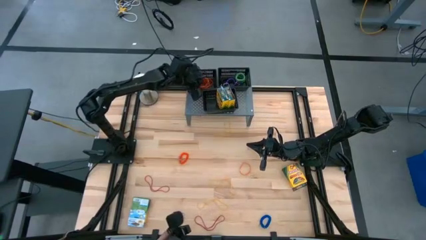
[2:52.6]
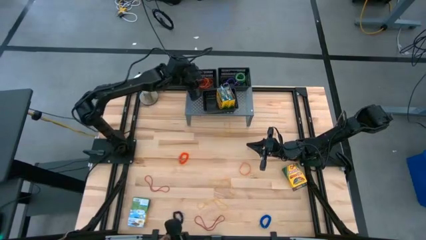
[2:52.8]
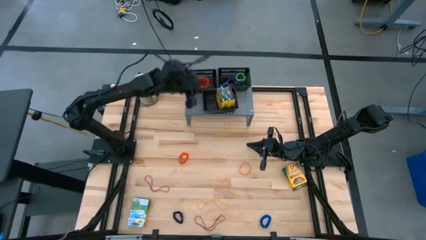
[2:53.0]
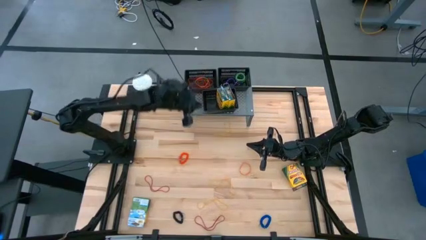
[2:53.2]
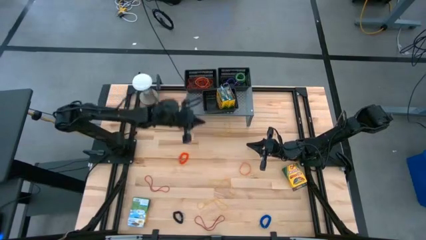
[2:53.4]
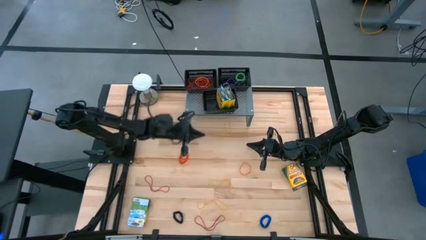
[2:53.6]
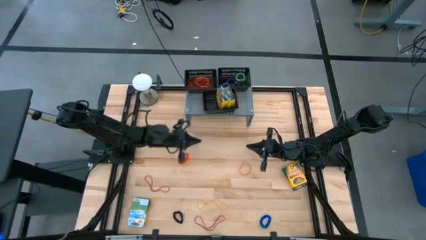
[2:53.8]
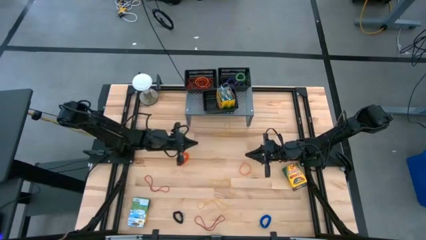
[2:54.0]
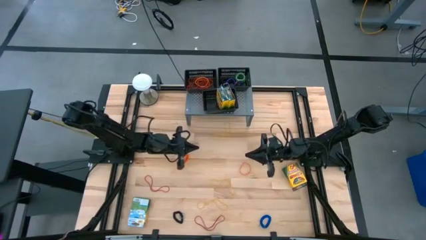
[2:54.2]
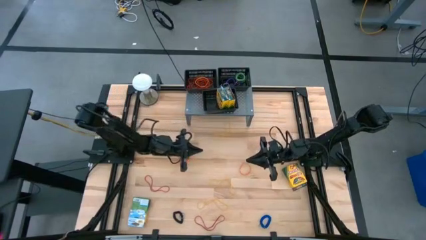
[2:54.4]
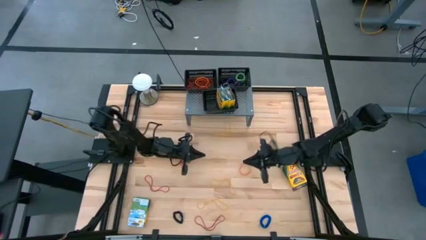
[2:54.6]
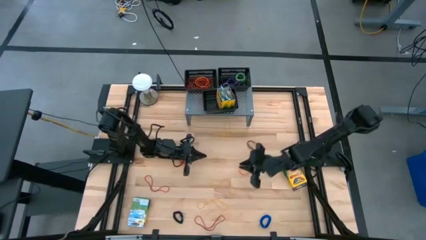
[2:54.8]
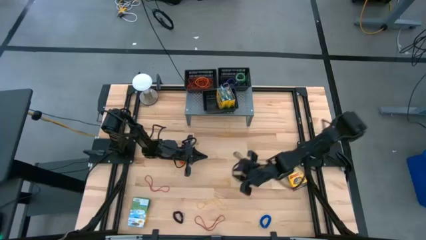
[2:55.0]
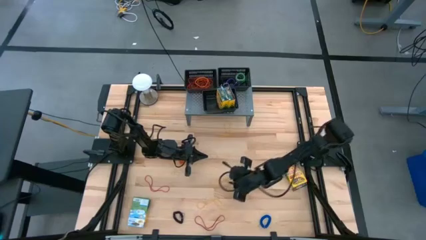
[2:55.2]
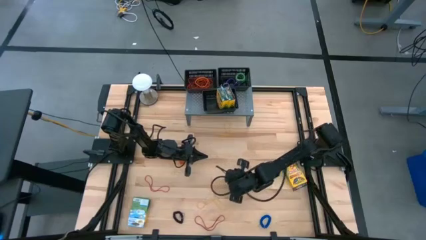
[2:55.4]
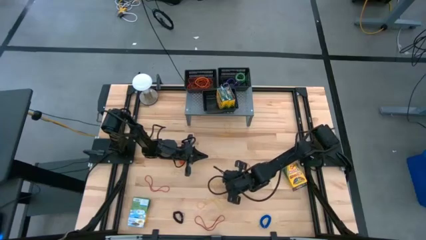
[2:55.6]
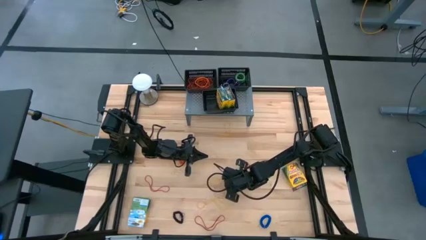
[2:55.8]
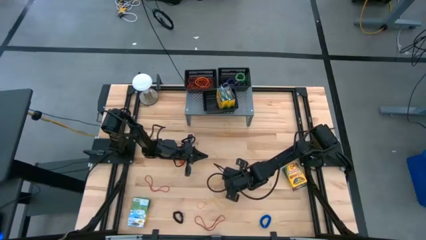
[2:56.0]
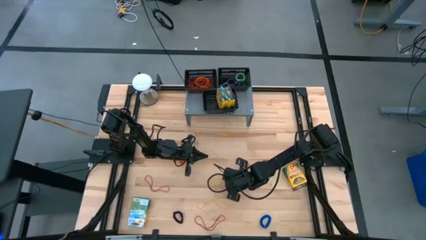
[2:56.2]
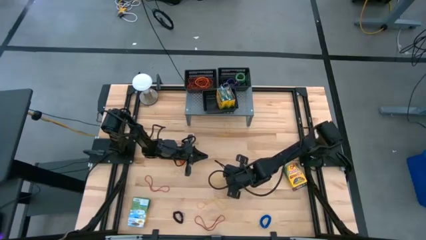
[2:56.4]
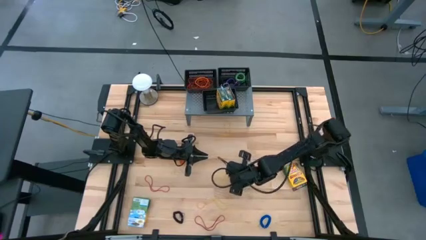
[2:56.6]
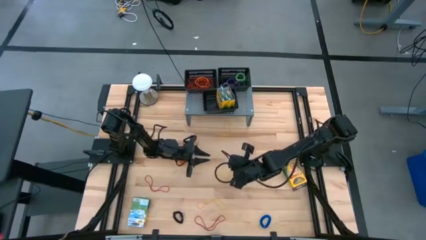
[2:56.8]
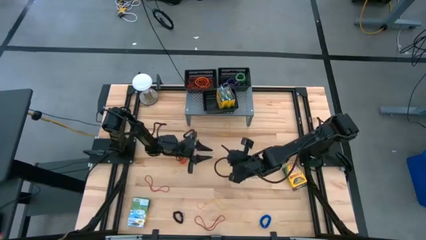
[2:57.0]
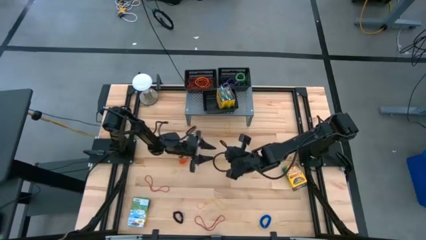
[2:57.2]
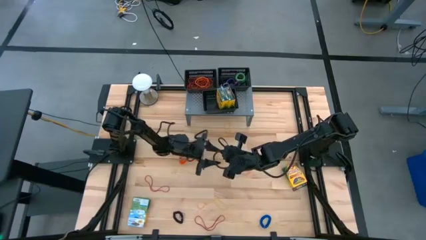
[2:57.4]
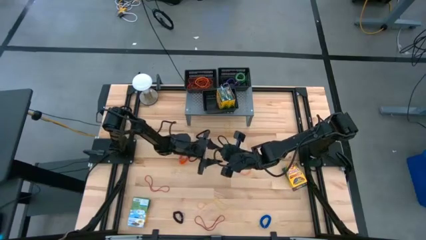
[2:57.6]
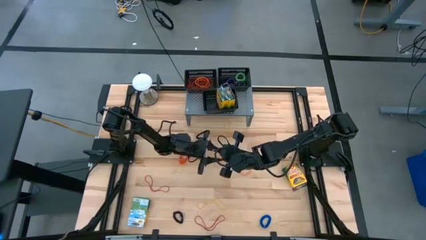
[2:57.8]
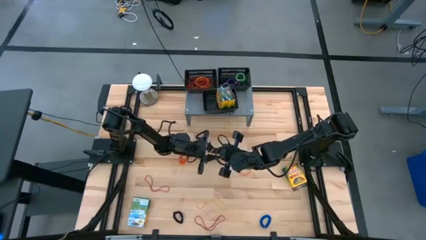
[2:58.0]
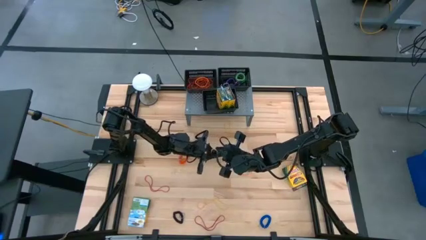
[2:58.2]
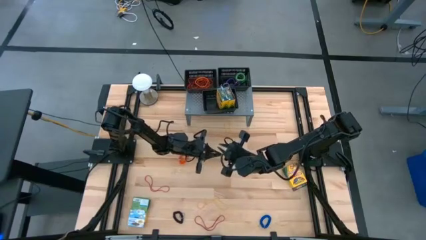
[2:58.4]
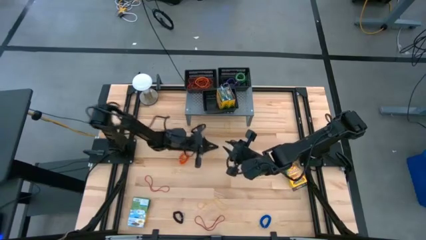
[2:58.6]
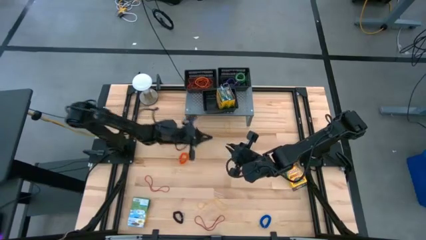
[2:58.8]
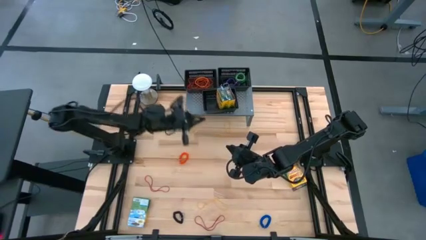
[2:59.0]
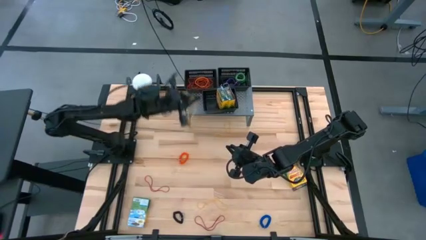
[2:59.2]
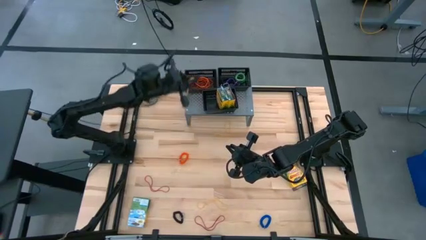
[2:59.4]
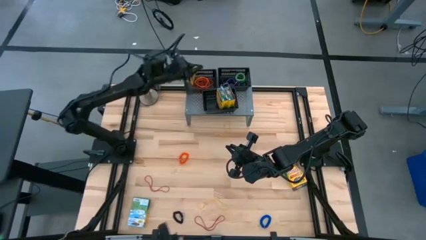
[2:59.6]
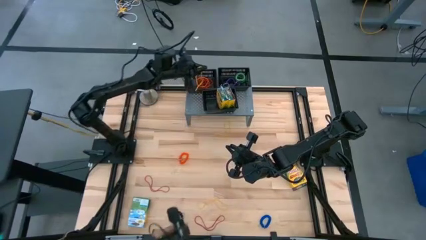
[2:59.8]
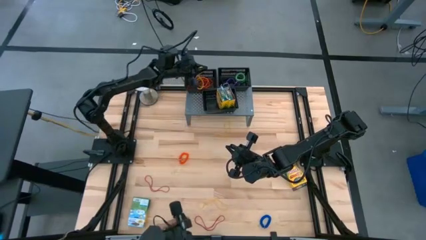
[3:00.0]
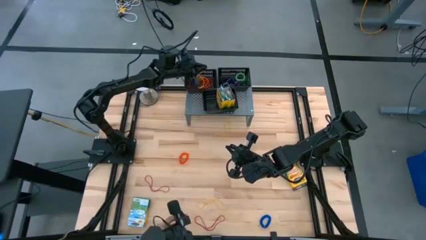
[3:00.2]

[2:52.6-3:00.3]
Task: Pick & Place Office Desk Supplies
Put the yellow rubber band into the top left black basket on the shelf

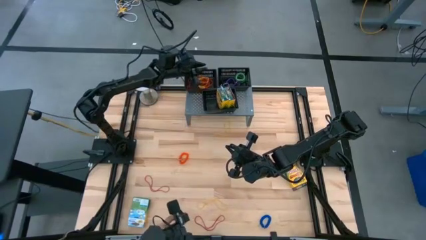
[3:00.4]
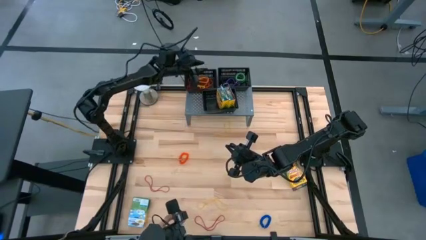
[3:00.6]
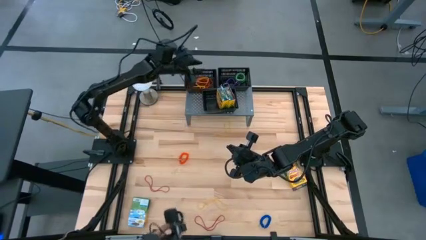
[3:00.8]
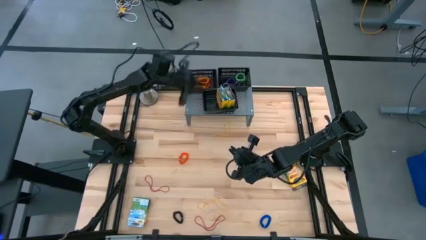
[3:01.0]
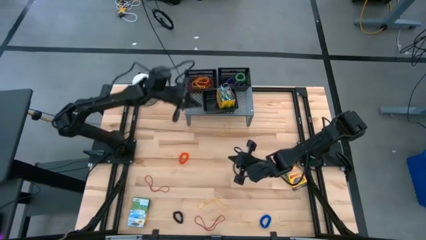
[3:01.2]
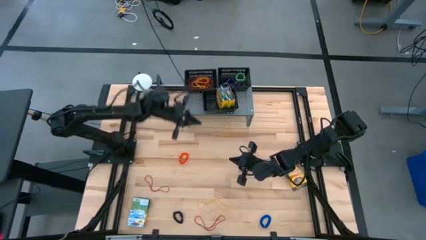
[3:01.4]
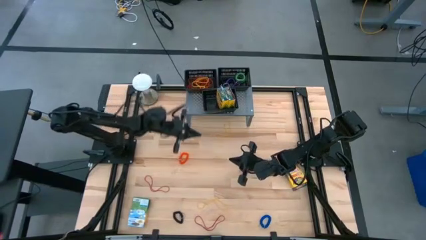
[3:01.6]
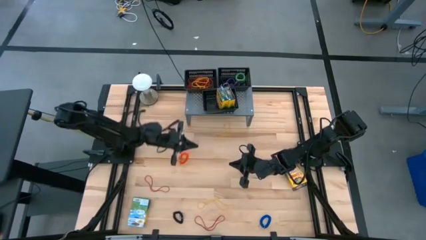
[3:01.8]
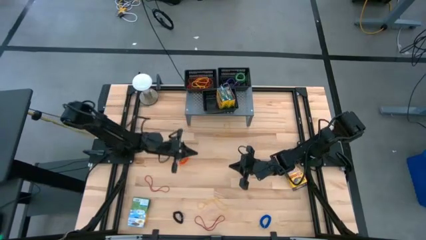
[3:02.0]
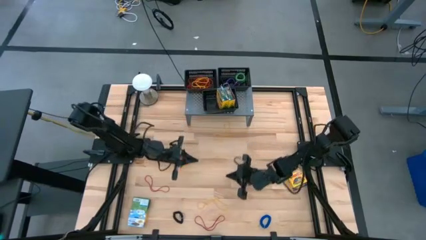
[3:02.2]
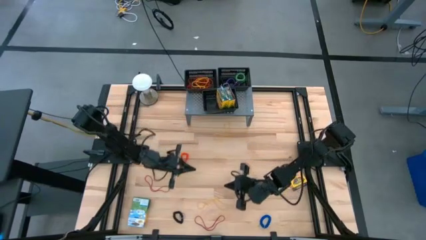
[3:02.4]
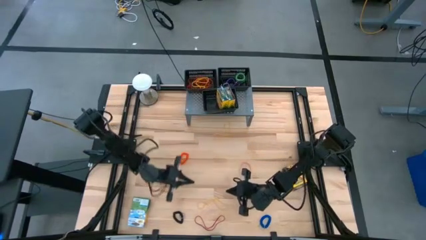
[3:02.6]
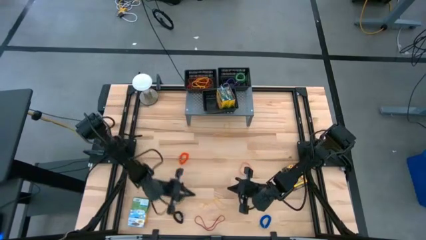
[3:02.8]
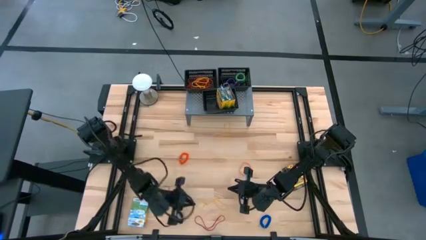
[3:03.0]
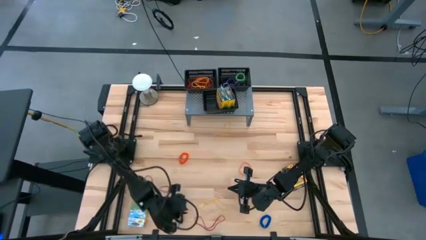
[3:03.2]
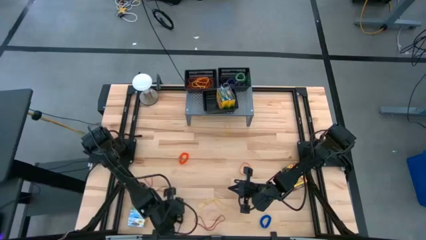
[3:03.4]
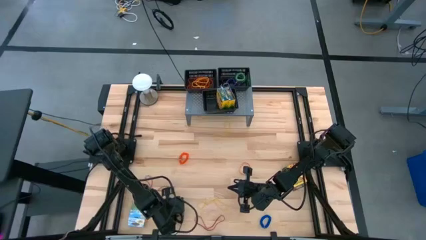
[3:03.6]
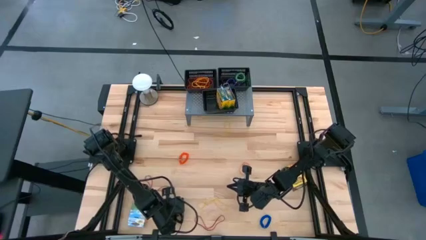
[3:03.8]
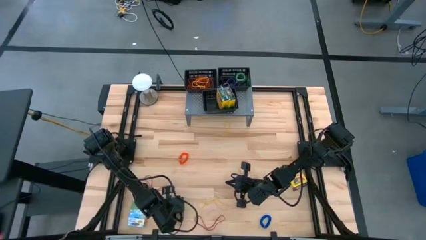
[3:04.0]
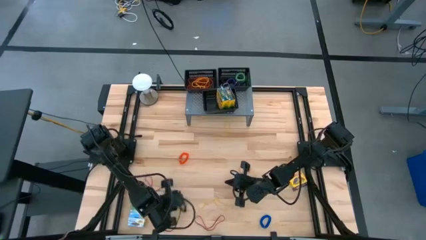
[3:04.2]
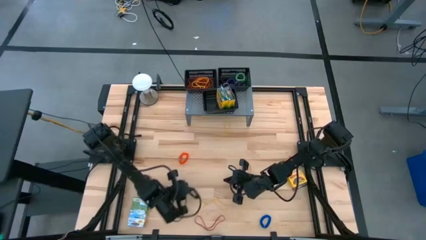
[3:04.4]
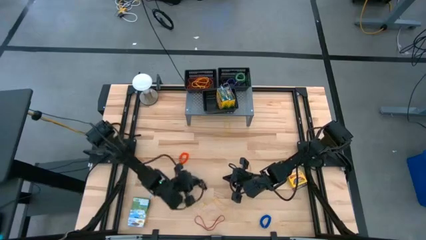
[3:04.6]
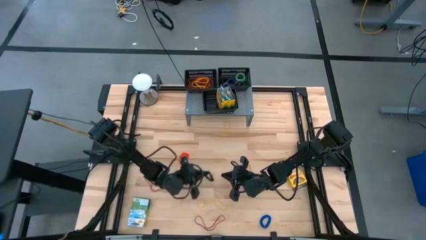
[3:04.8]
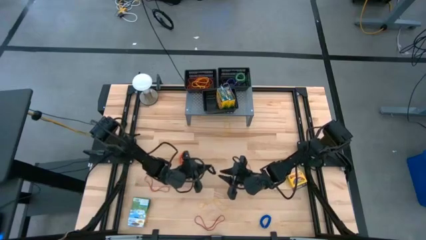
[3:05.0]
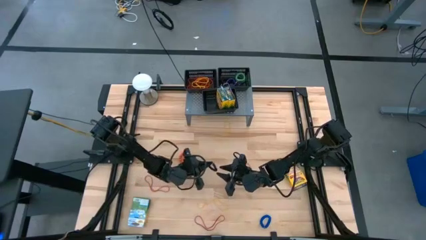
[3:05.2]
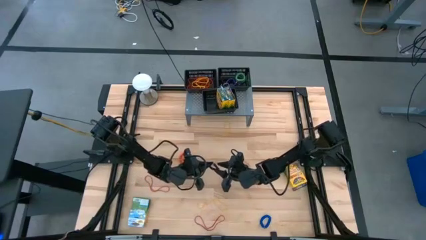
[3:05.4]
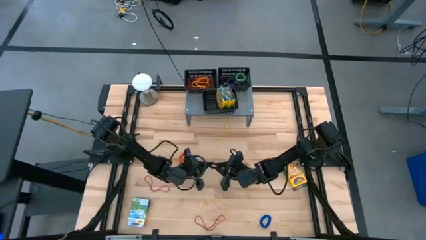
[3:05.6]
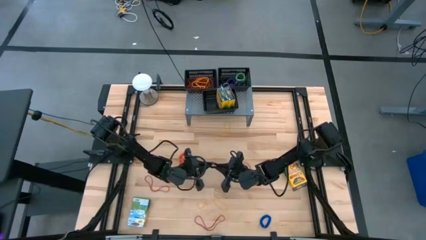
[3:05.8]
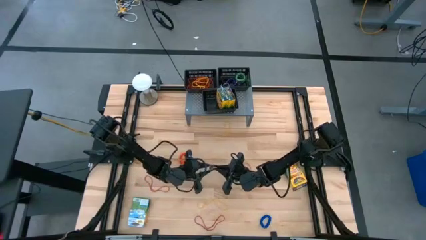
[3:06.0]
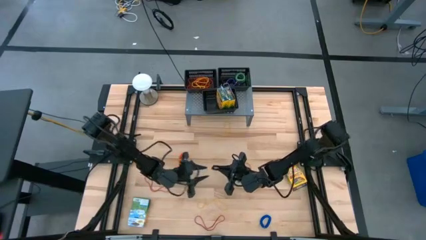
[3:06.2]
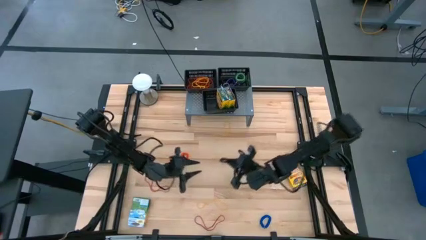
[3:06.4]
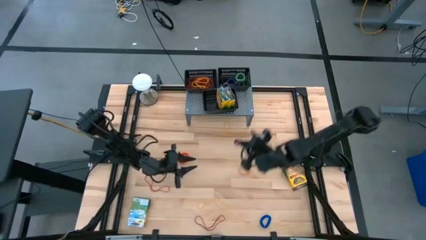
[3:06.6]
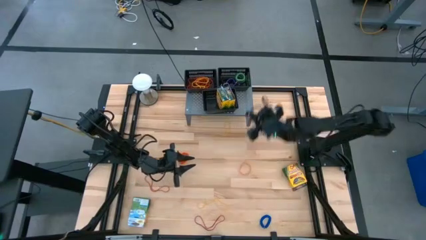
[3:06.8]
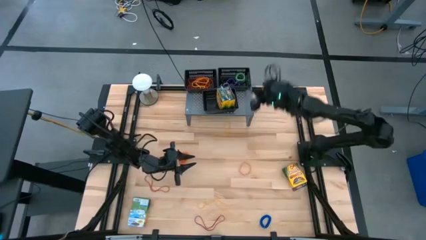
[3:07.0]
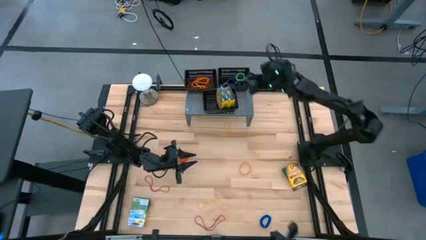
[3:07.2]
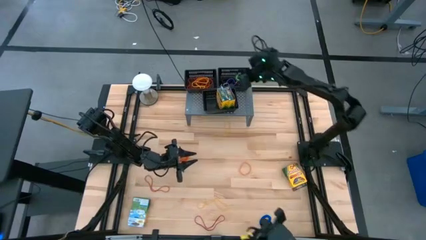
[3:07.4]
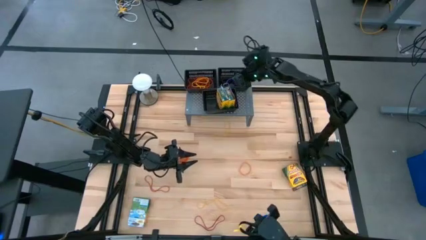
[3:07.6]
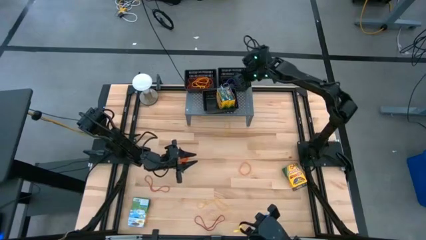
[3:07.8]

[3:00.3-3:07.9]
Put the black spring keychain into the top right black basket on the shelf
